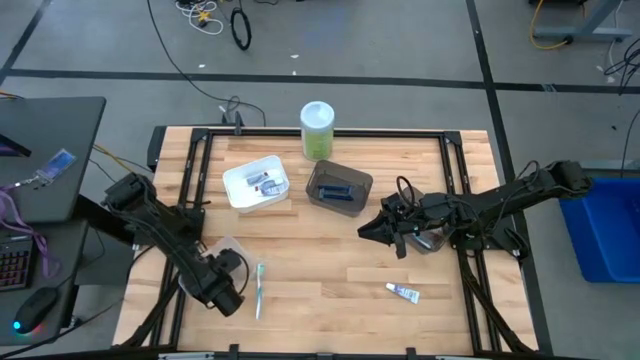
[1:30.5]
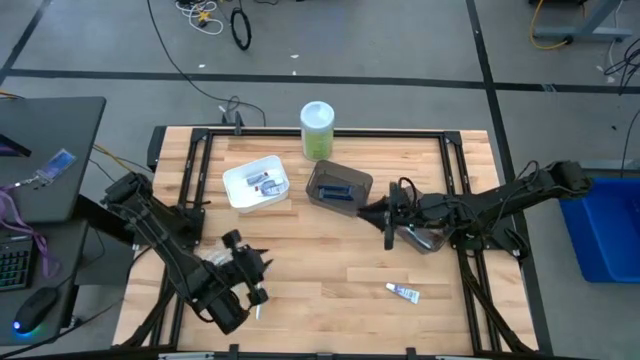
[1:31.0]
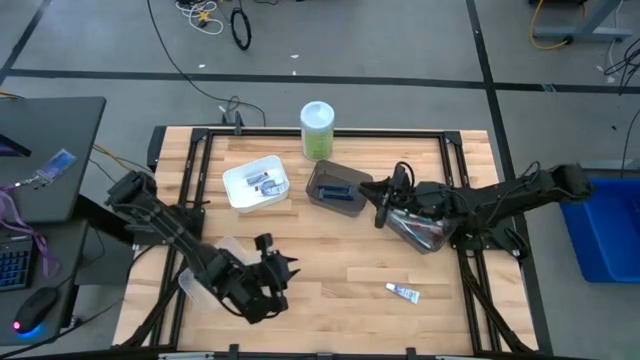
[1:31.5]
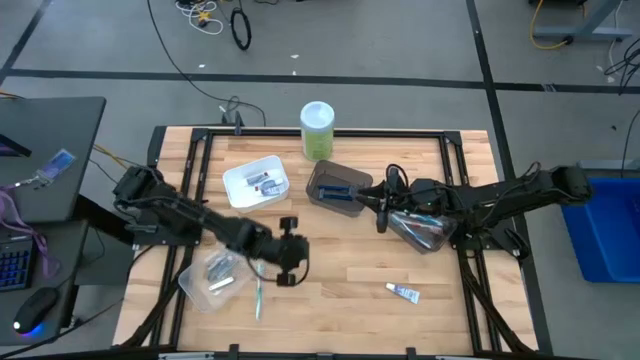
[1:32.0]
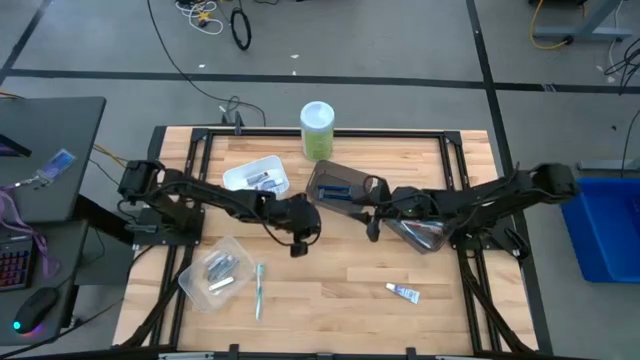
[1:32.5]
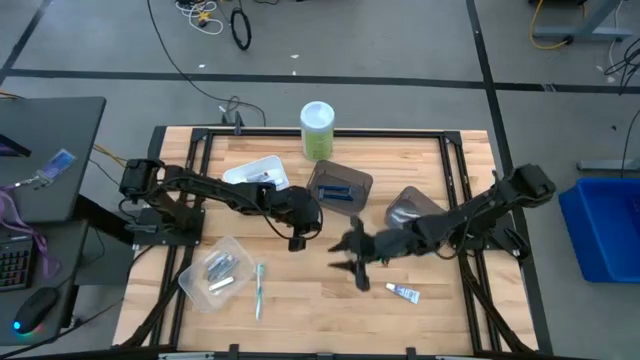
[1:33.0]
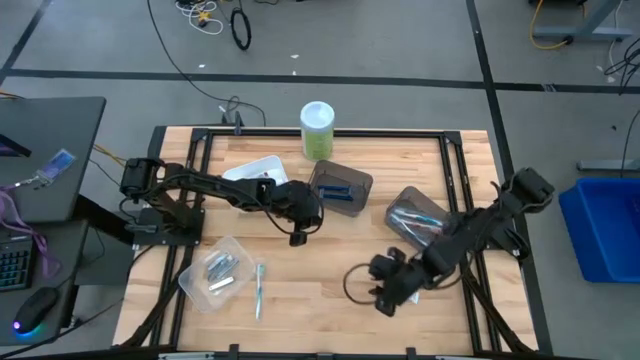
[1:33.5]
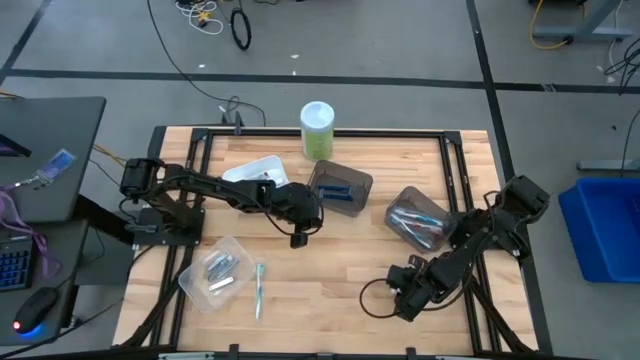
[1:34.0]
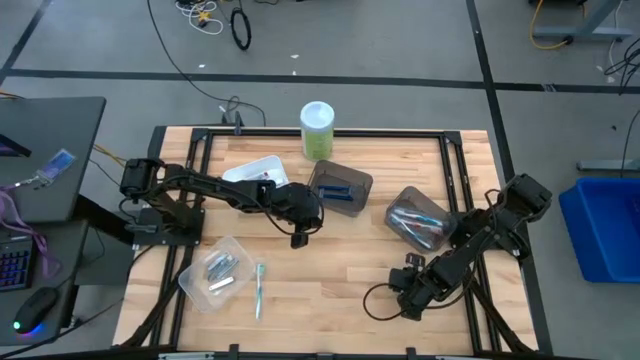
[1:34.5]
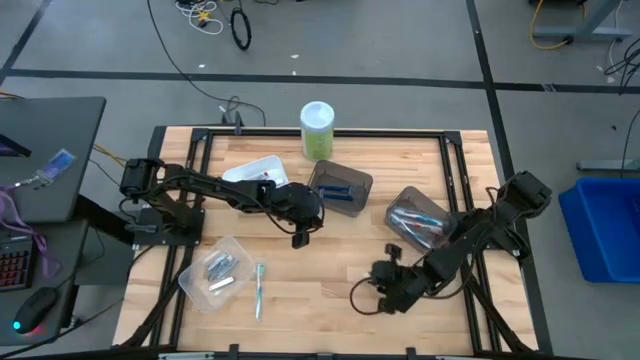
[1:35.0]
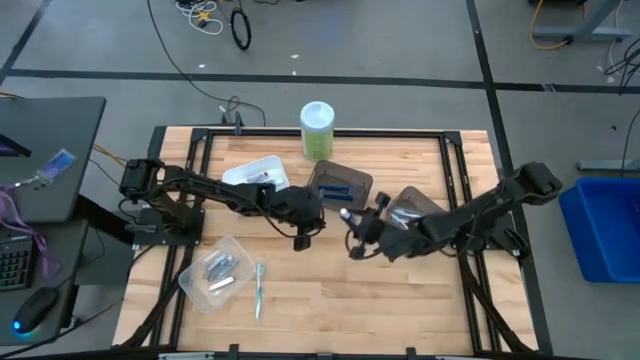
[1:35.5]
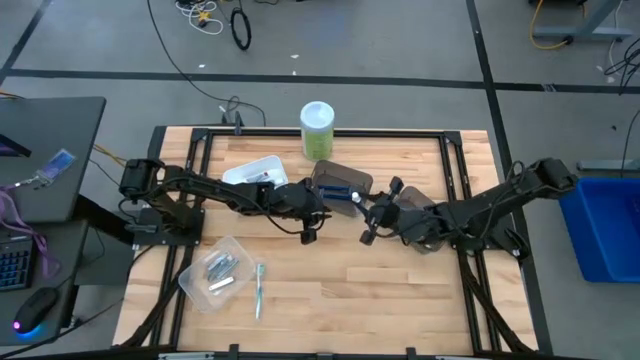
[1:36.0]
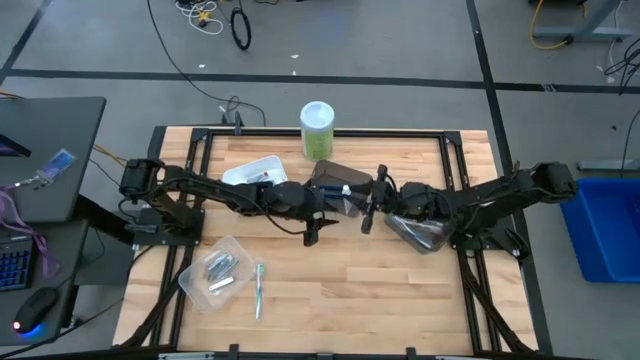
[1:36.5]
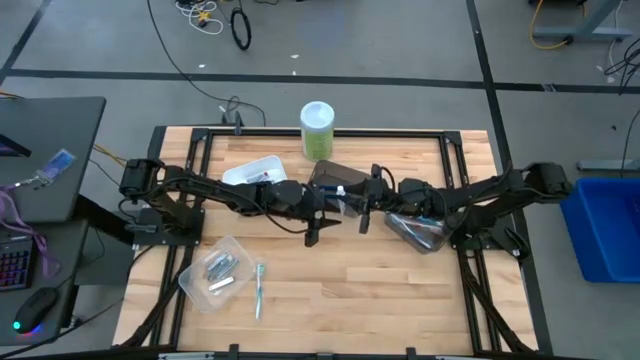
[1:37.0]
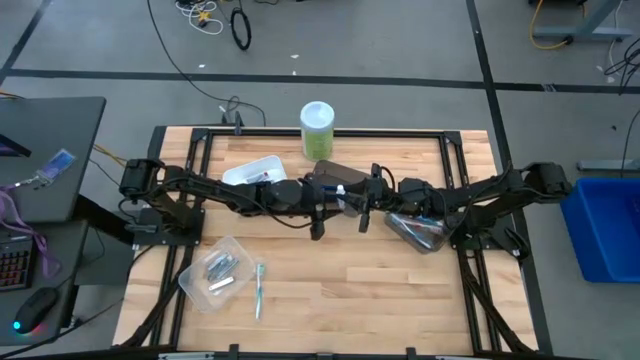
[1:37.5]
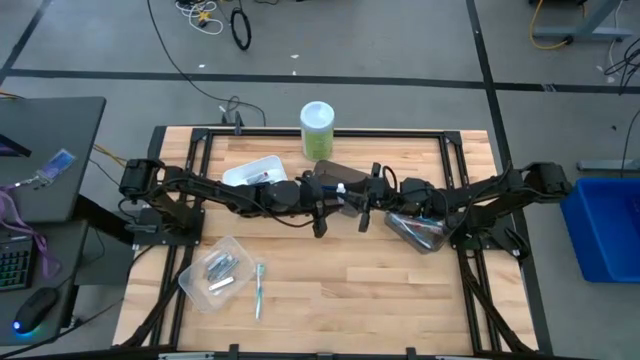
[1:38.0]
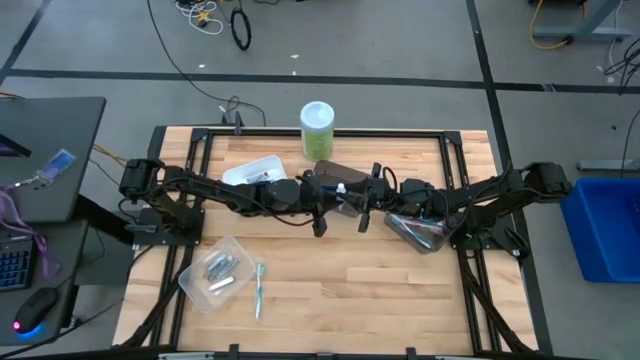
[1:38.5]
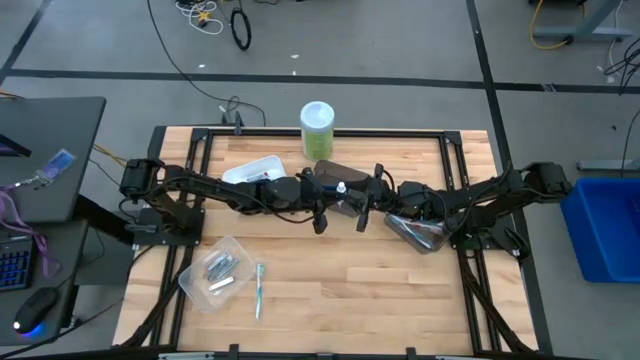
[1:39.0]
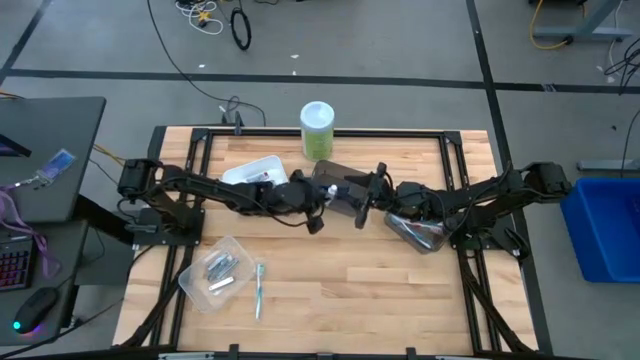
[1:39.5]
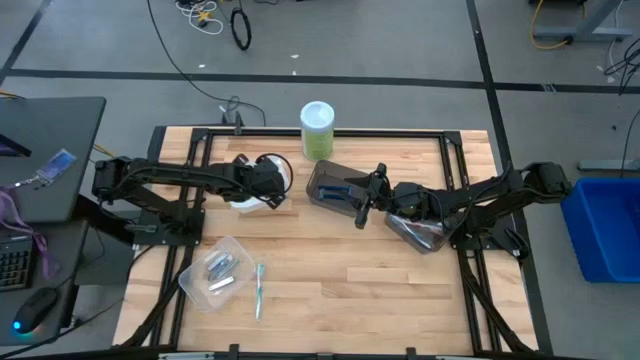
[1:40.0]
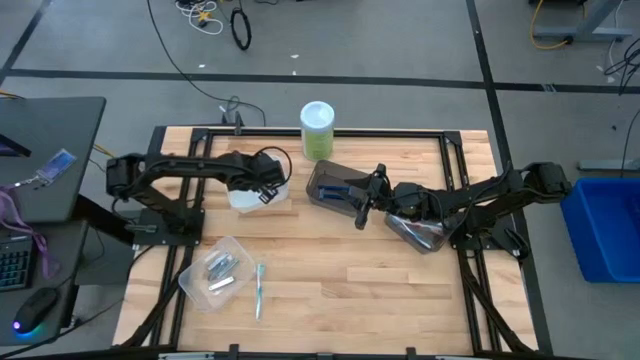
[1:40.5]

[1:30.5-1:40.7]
Task: Pick & Place Travel size toiletries
Put the toothpaste into the white bin

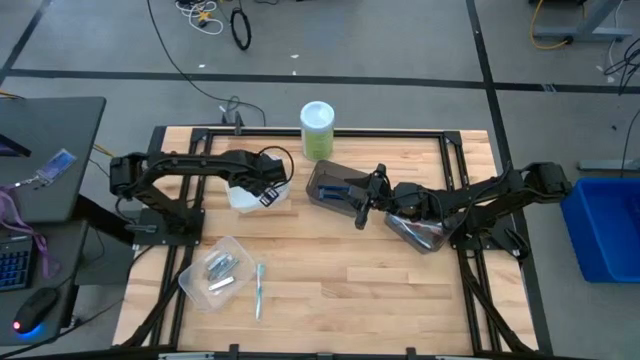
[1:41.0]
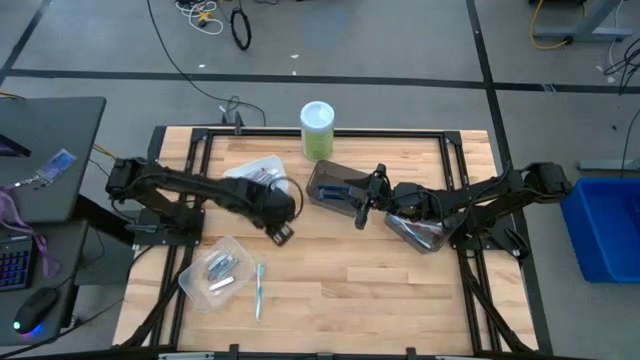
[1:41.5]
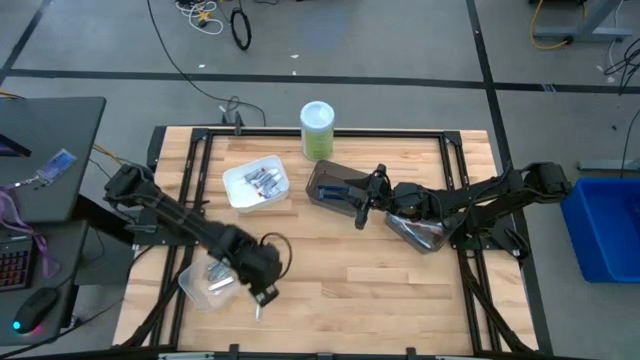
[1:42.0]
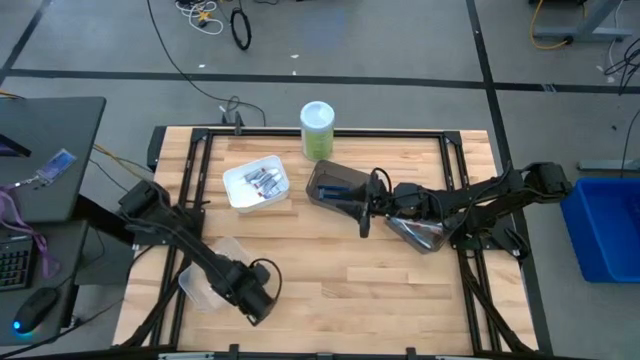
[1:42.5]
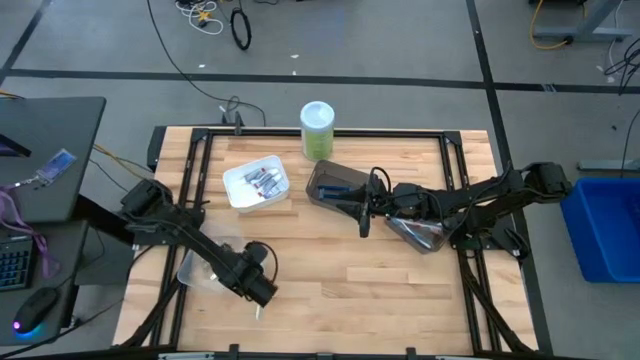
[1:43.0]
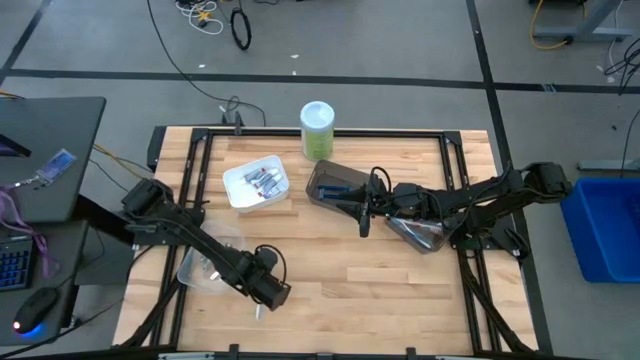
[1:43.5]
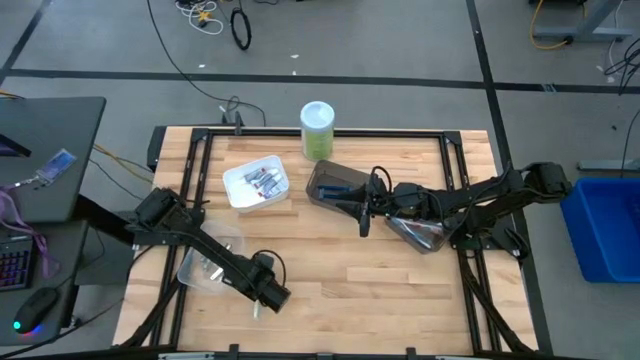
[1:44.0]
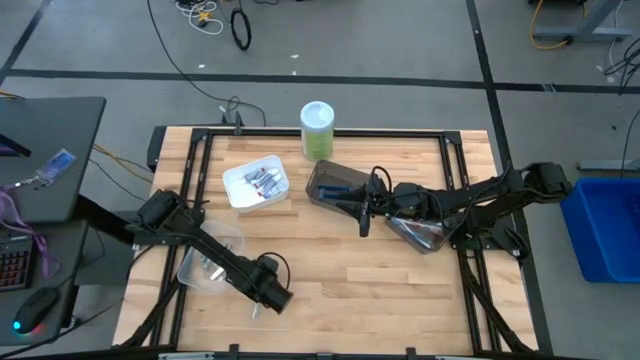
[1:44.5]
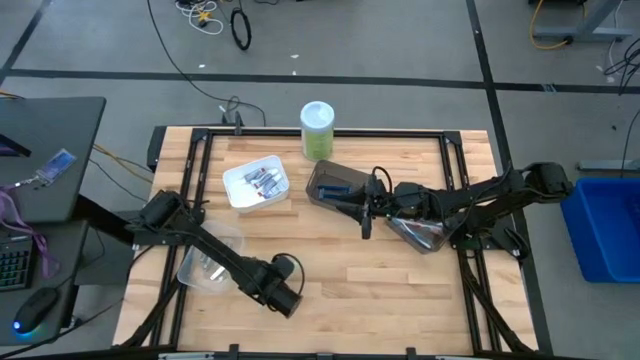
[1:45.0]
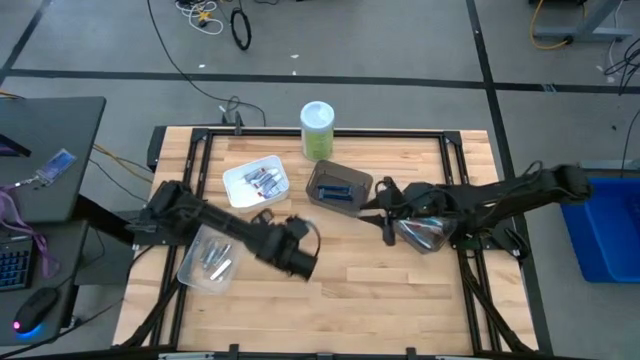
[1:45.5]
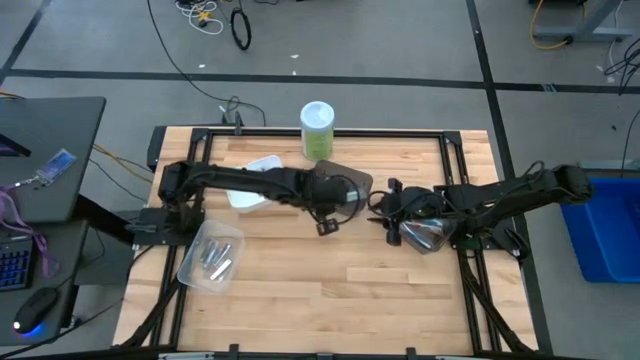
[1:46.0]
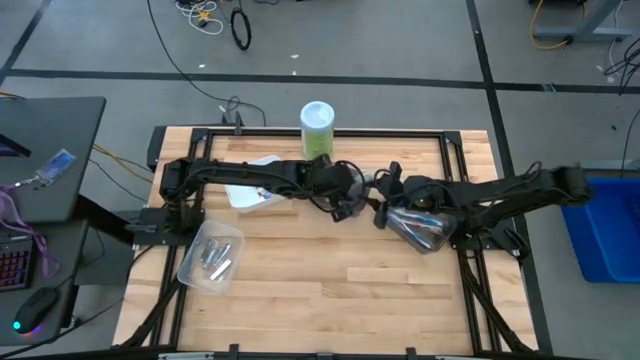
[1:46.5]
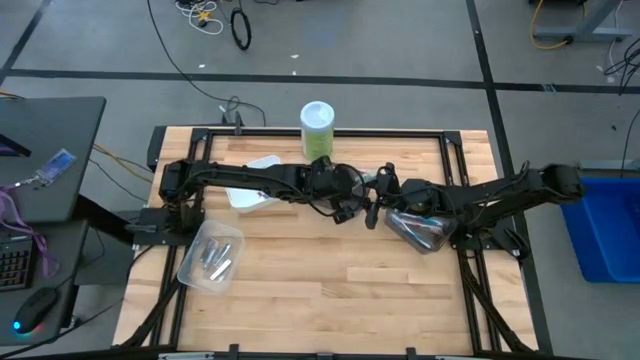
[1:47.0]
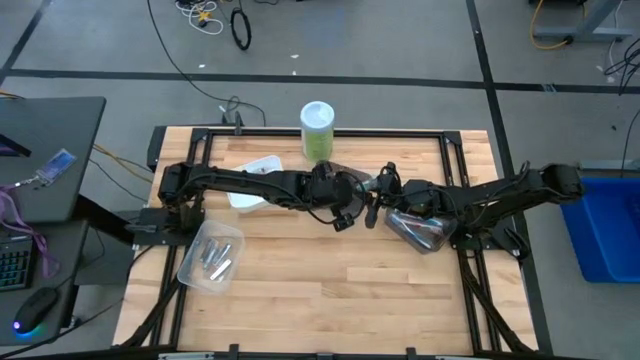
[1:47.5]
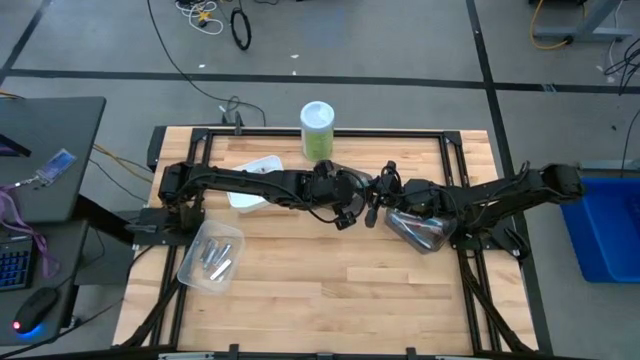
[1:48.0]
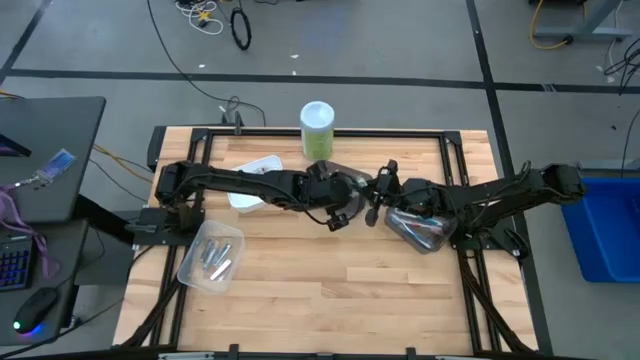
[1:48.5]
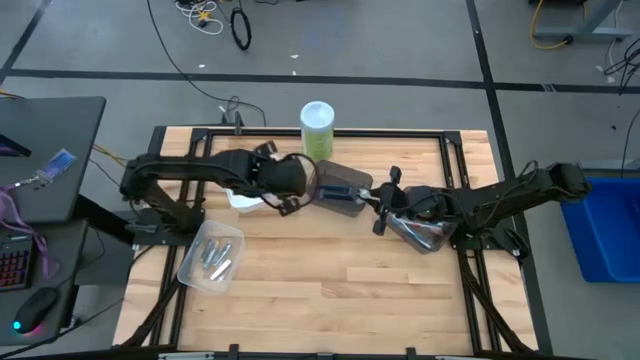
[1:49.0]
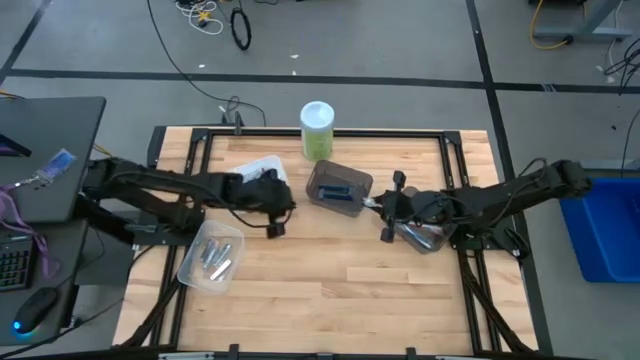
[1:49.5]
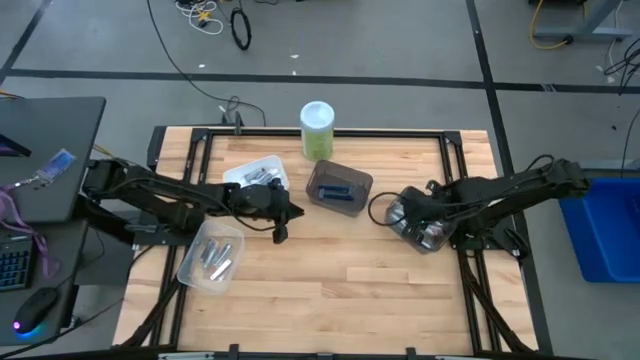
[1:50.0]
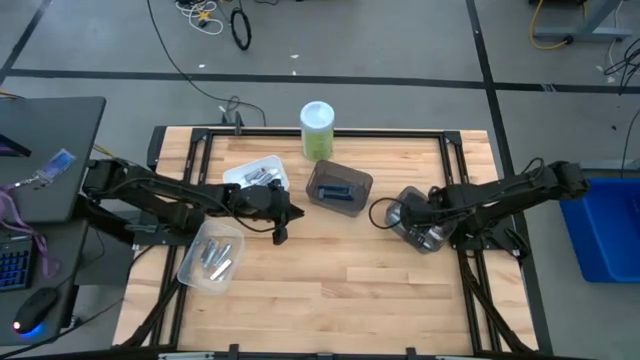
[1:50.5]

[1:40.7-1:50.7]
Put the green toothbrush into the right black bin

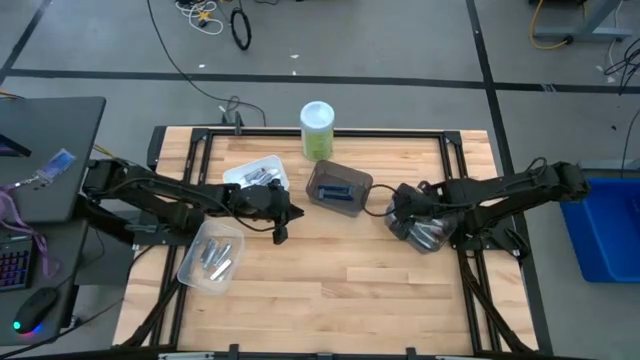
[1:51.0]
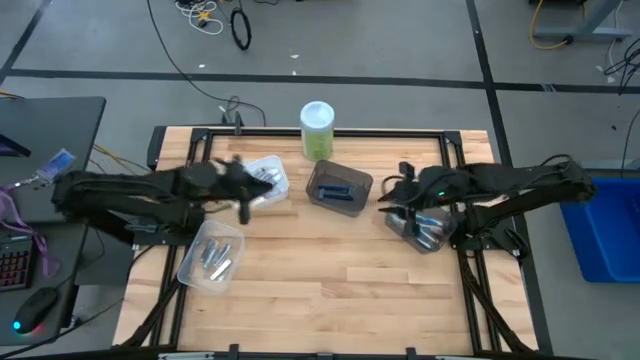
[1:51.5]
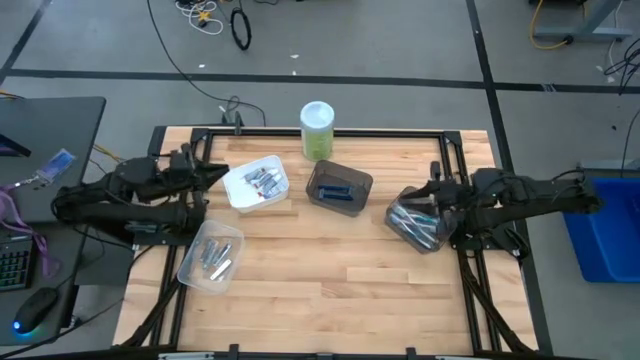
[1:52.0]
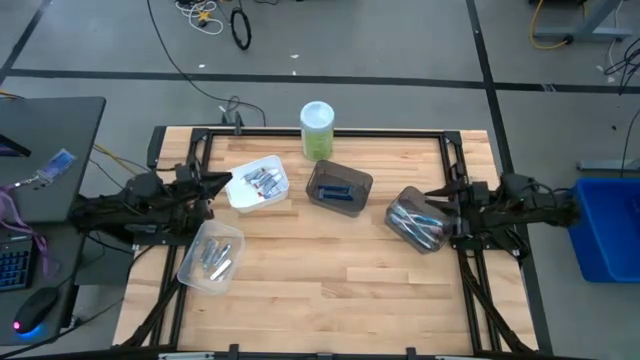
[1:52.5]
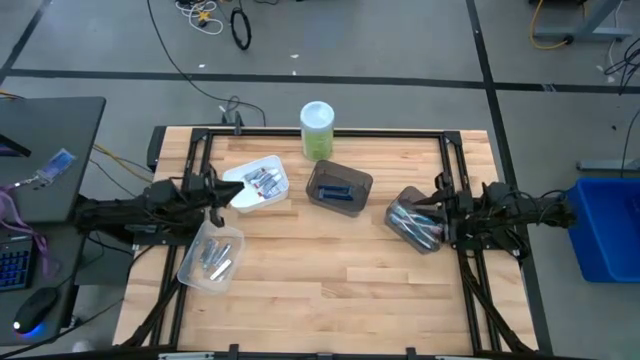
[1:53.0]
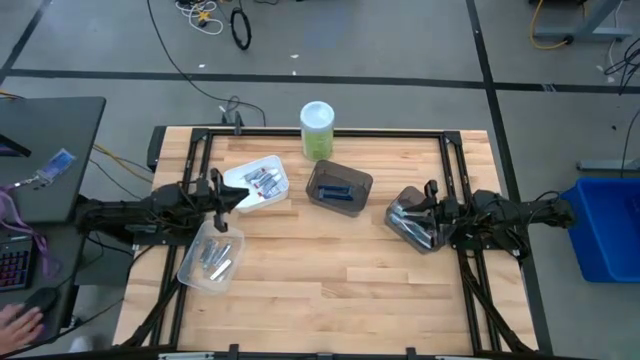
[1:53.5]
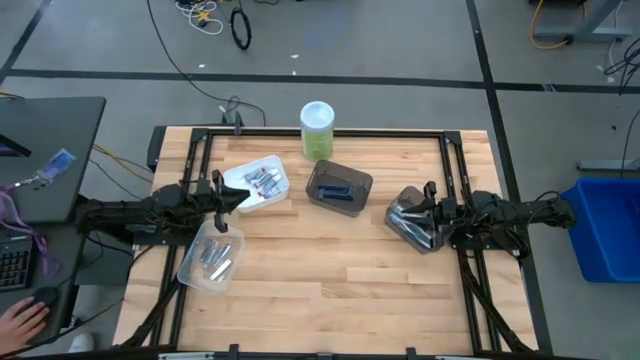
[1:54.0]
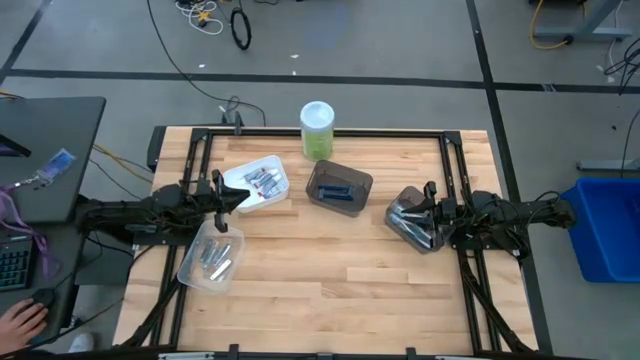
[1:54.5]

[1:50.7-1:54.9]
Return to Home Position
